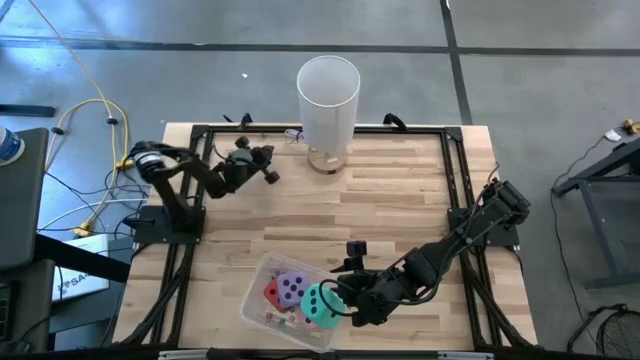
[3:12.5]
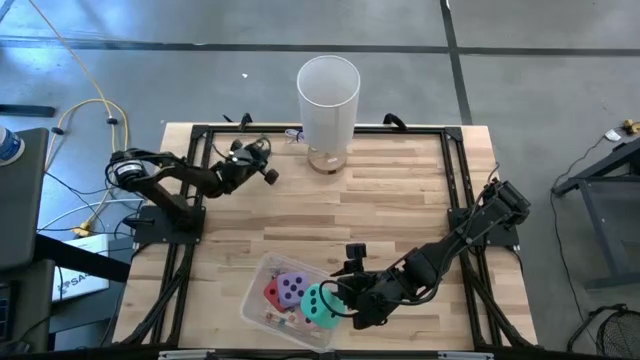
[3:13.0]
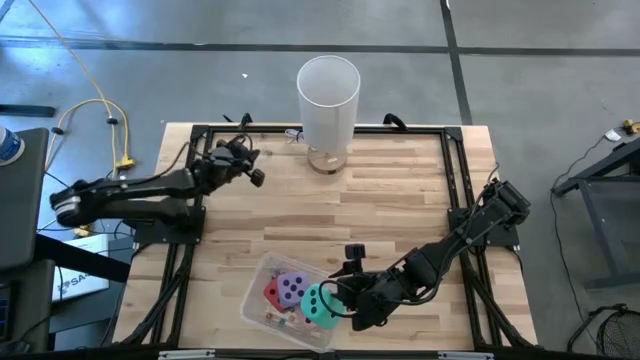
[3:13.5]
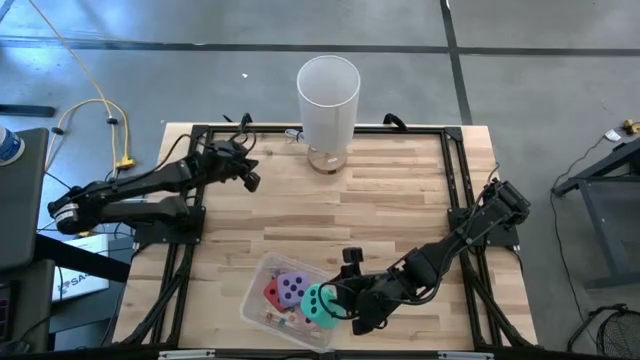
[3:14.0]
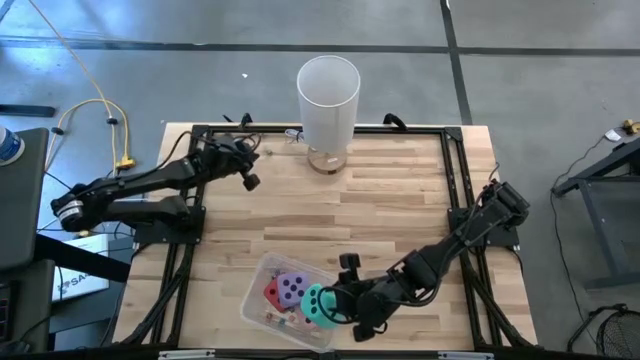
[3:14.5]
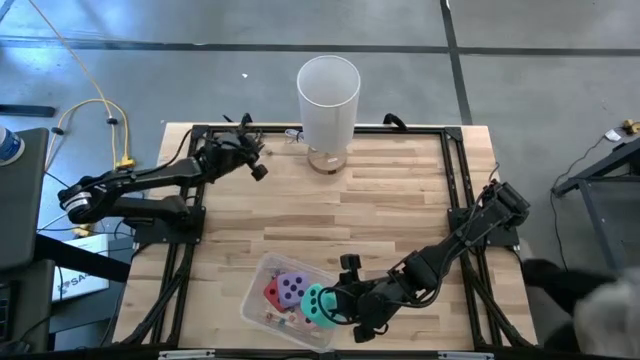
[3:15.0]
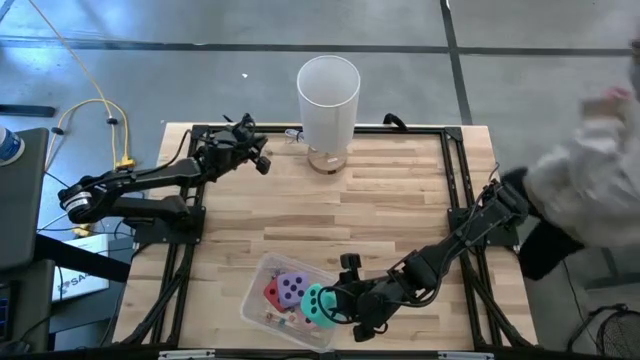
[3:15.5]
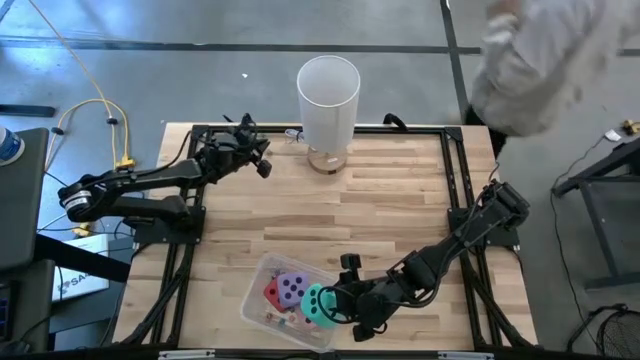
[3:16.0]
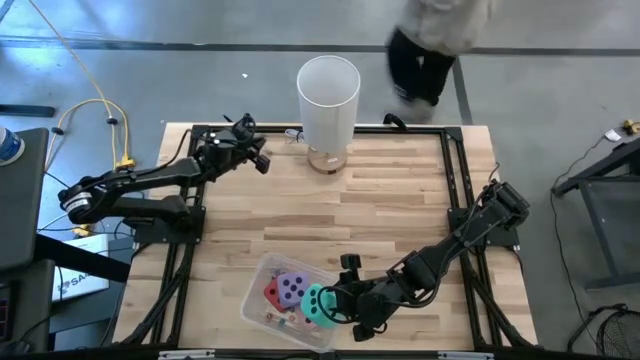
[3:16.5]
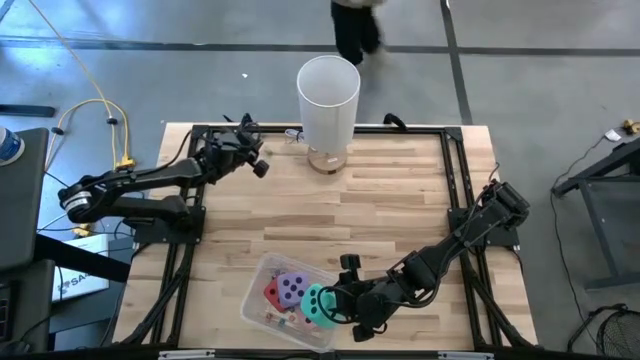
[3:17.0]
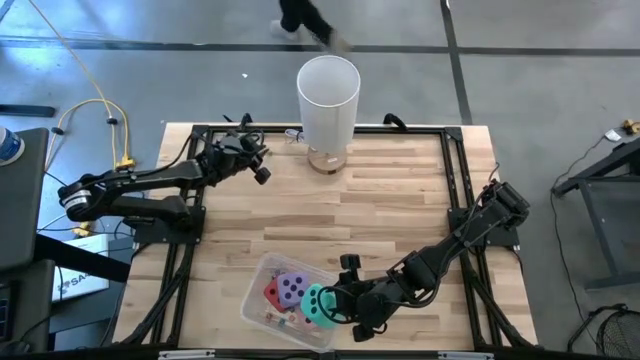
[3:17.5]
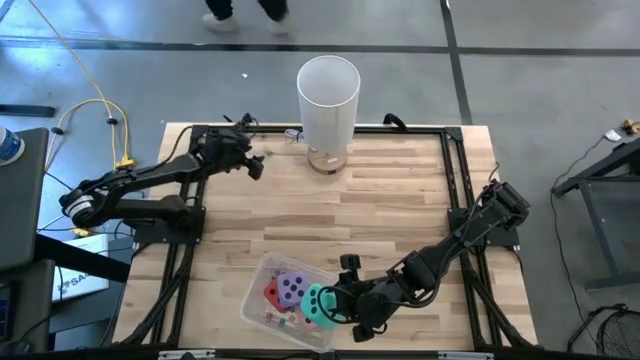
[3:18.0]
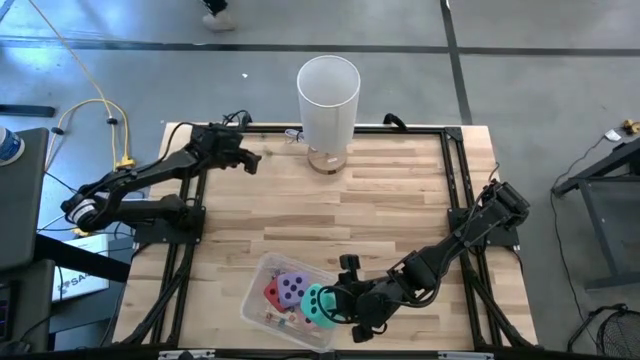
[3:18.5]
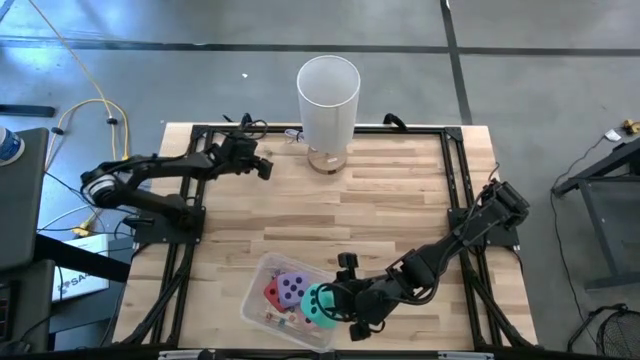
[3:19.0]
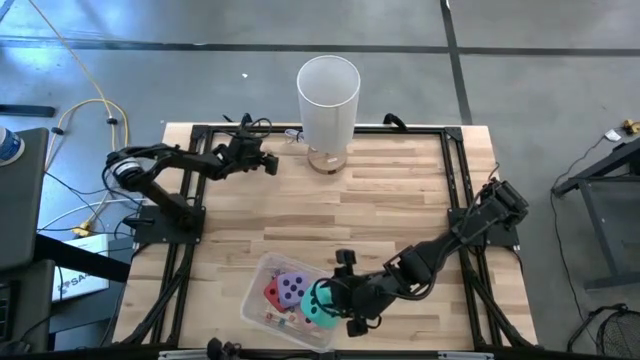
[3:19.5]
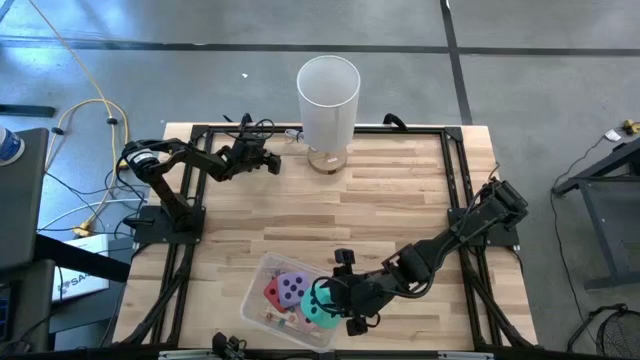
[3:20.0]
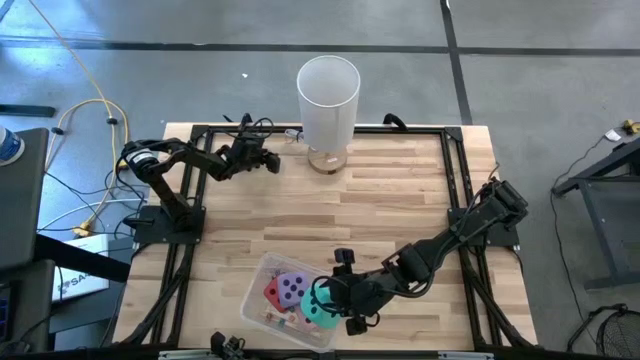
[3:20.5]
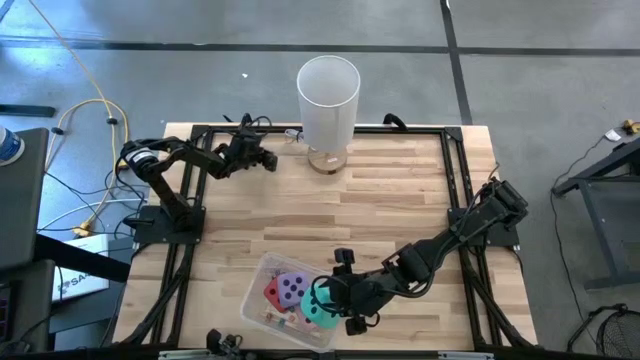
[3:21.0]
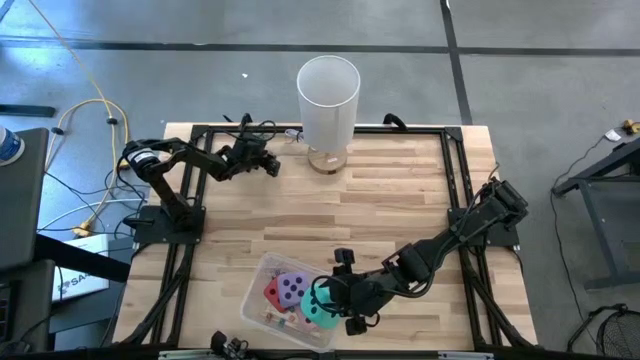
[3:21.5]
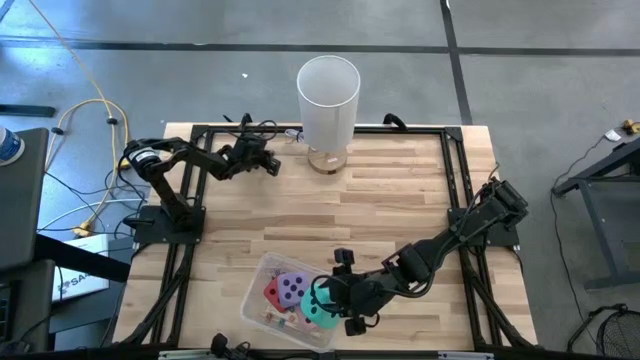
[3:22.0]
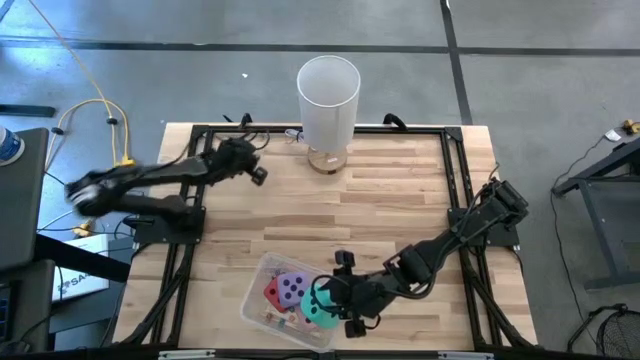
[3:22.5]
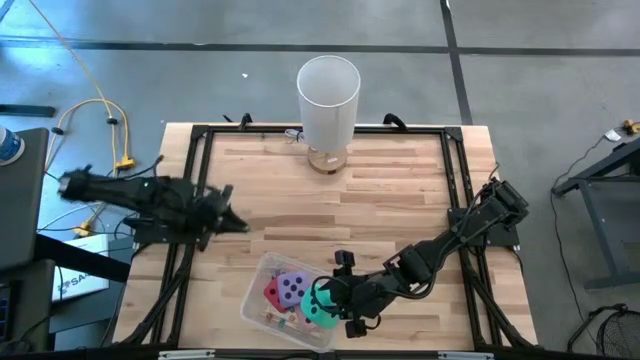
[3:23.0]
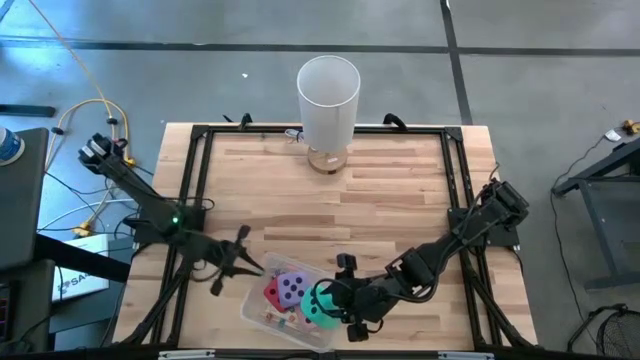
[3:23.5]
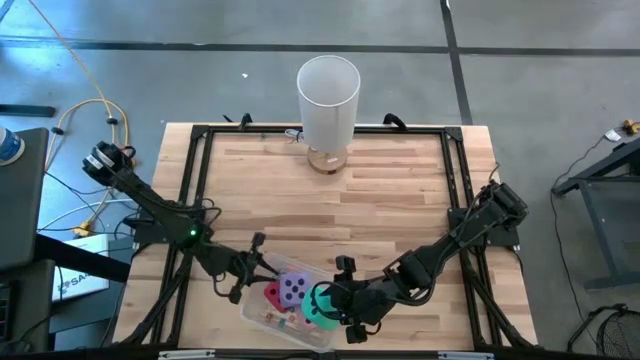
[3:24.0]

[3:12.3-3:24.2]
Task: Pick & Place Dice
Put the small green dice into the transparent bin

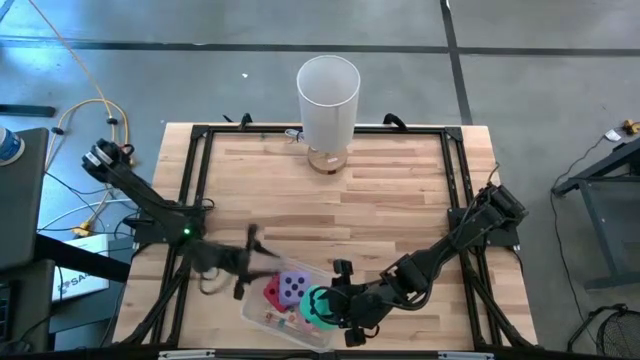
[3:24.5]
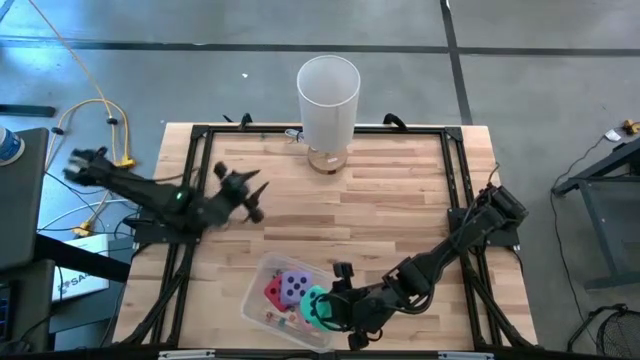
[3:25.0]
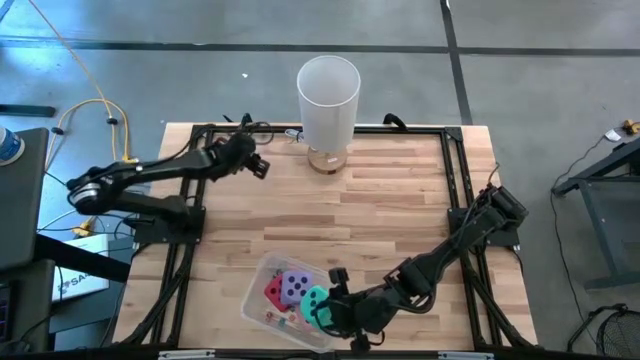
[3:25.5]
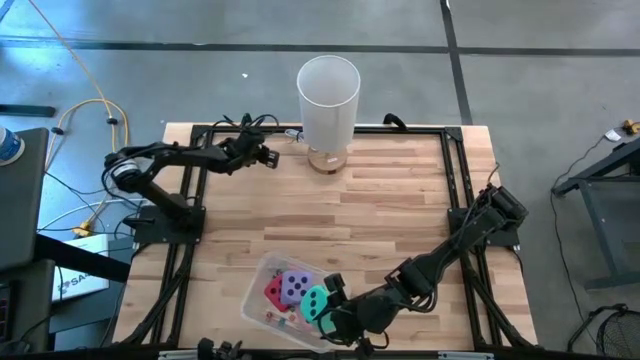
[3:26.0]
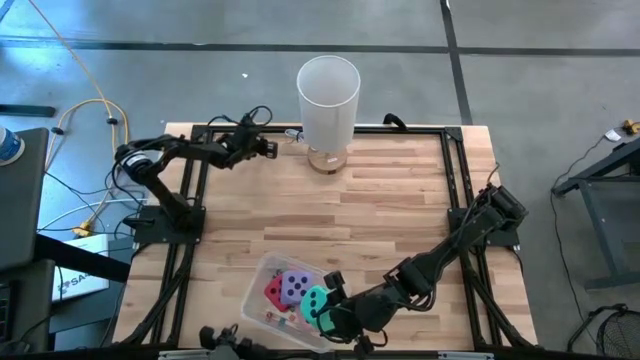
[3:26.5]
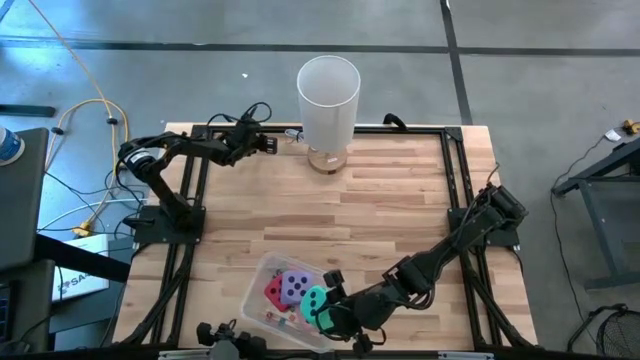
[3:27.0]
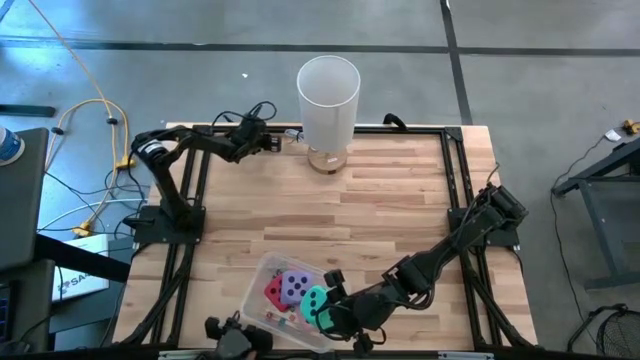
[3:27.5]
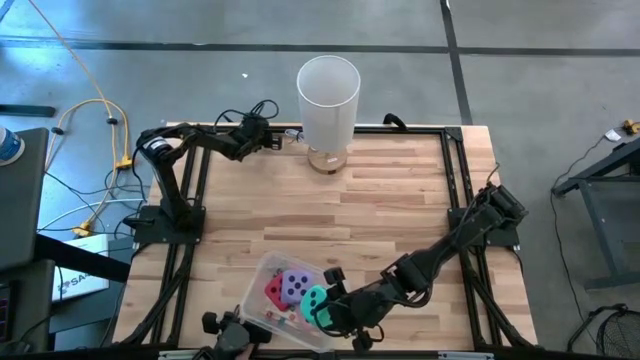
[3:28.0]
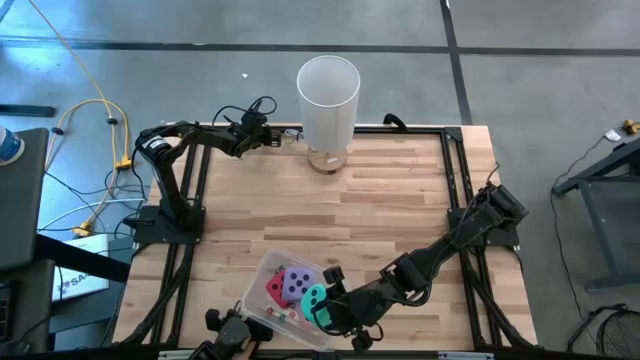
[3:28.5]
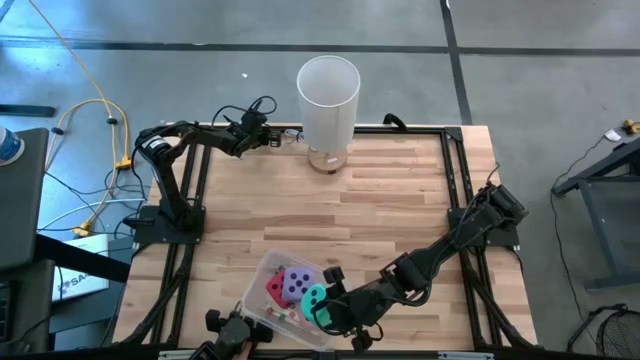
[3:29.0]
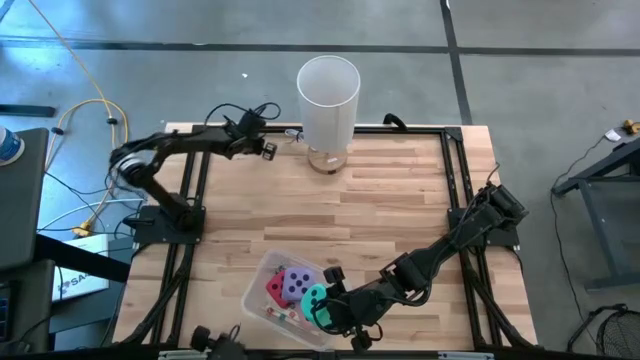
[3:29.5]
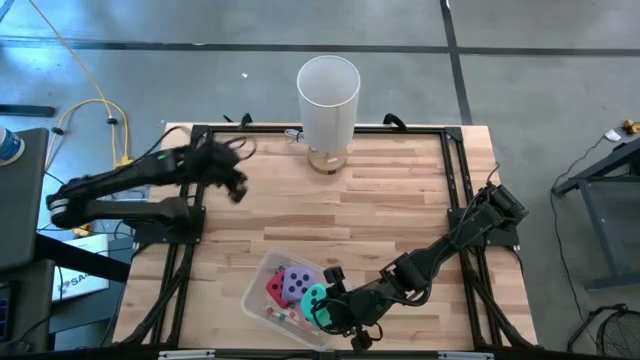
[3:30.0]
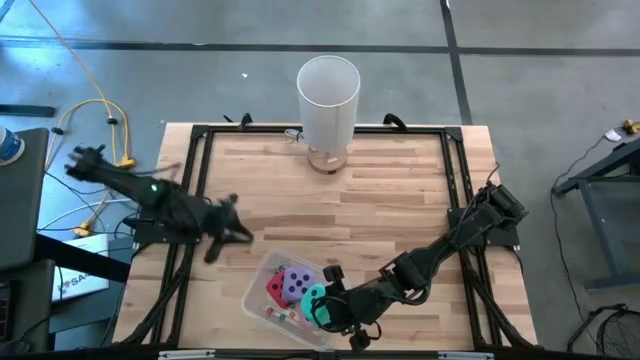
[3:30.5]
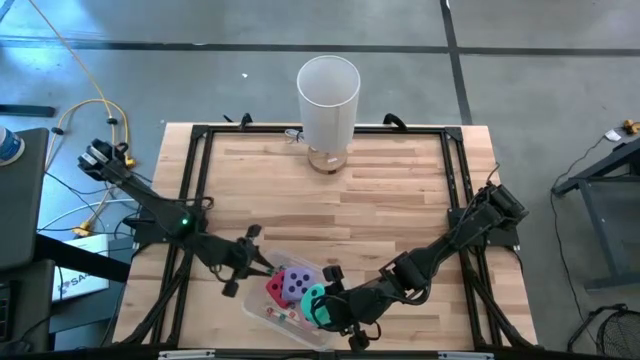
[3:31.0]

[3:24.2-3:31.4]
Put the small green dice into the transparent bin

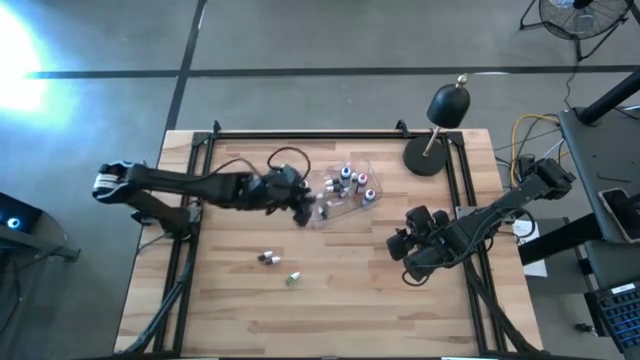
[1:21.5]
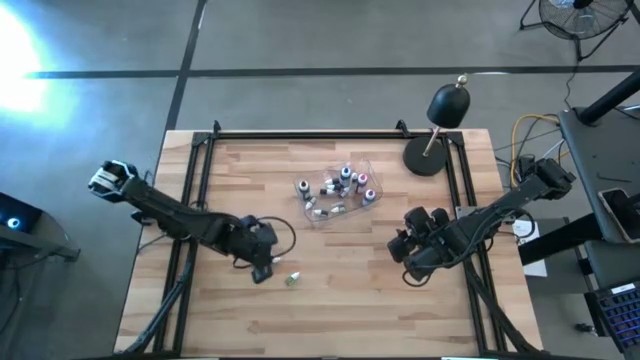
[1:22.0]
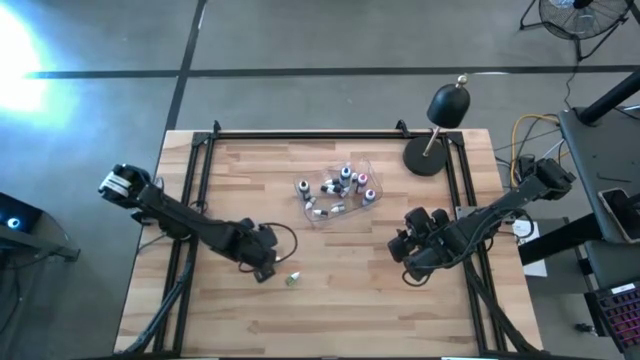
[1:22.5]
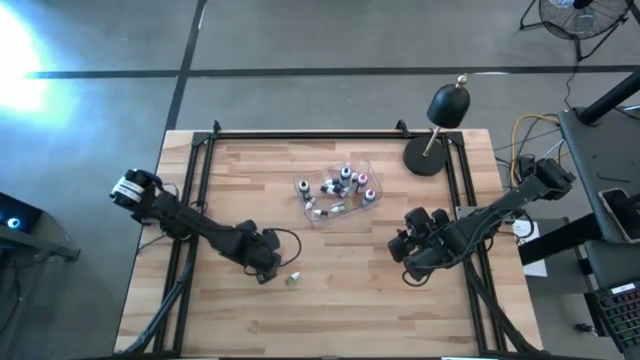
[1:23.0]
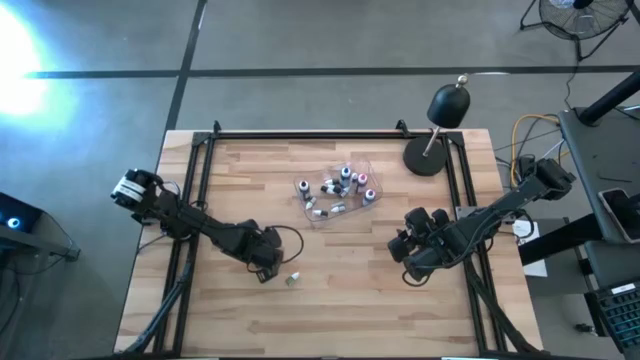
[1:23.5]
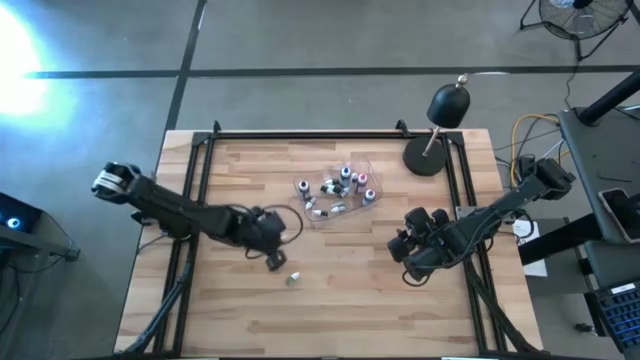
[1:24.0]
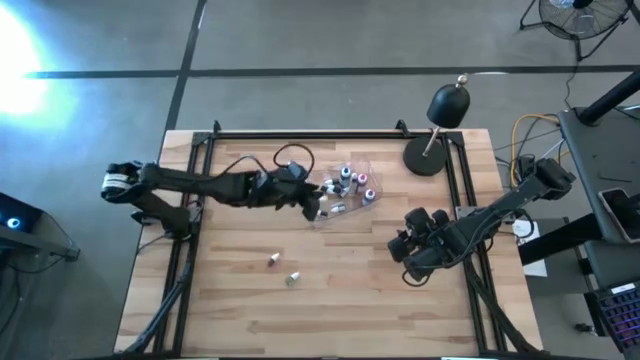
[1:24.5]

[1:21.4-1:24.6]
Task: Pick & Place food coloring
Put the small black food coloring bottle into the transparent bin
